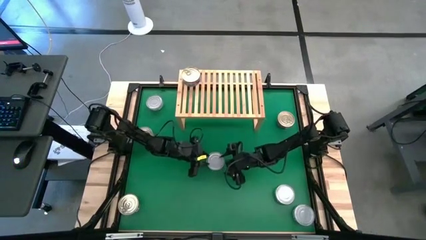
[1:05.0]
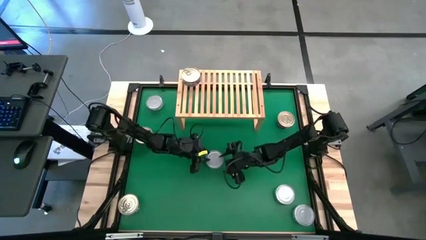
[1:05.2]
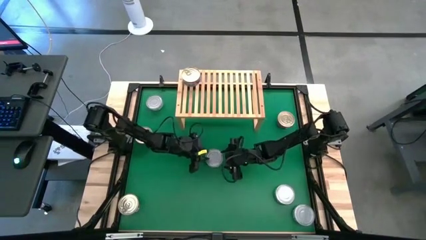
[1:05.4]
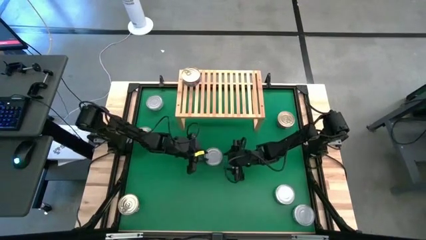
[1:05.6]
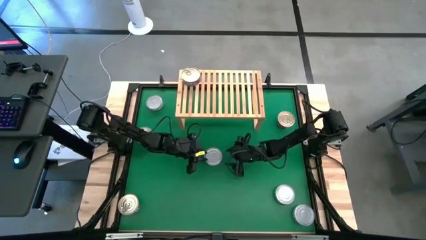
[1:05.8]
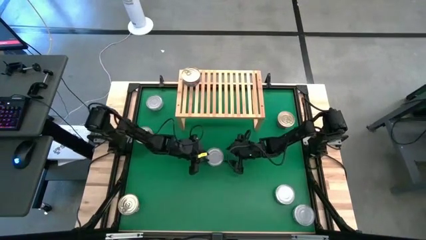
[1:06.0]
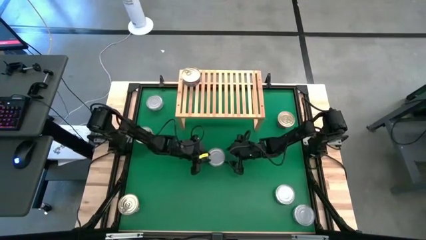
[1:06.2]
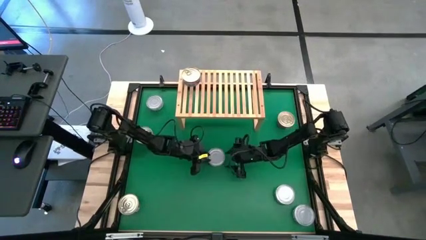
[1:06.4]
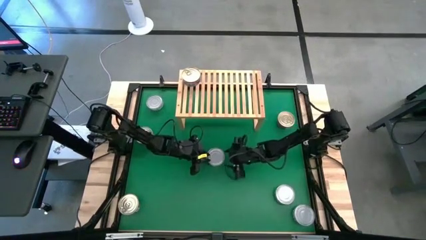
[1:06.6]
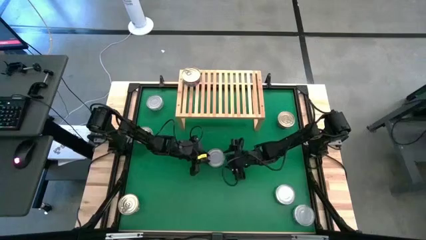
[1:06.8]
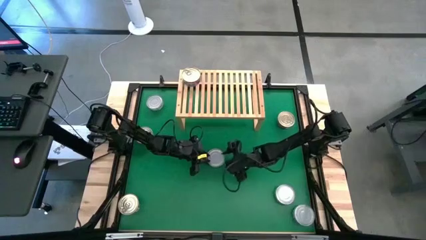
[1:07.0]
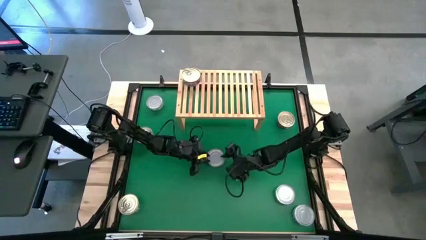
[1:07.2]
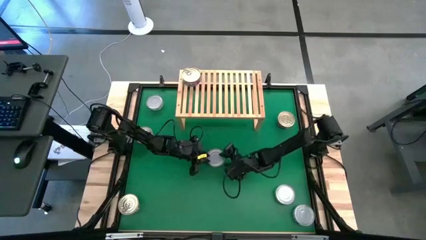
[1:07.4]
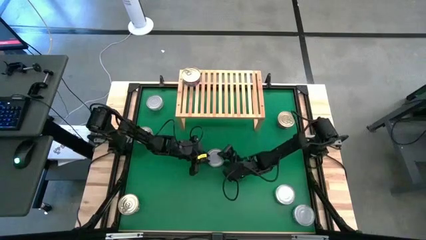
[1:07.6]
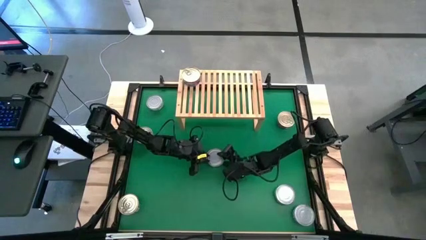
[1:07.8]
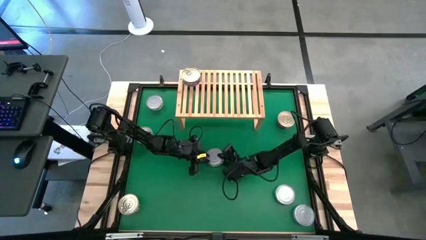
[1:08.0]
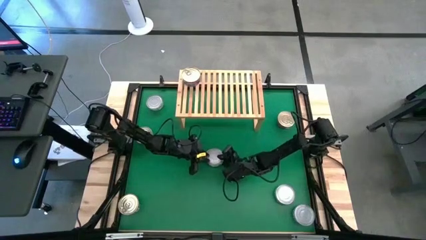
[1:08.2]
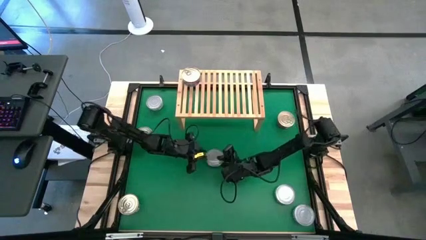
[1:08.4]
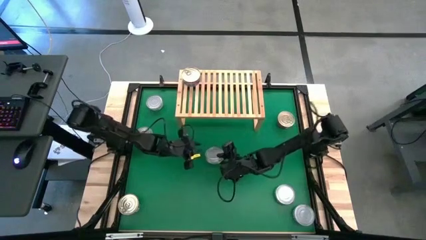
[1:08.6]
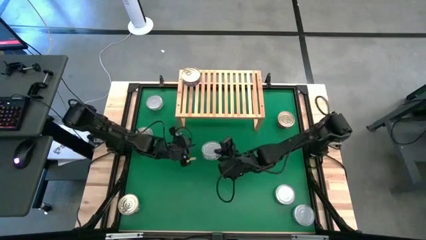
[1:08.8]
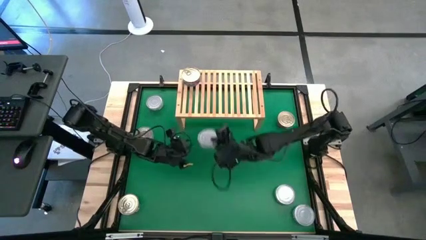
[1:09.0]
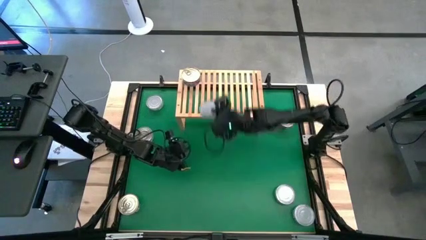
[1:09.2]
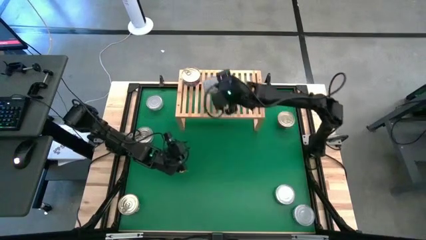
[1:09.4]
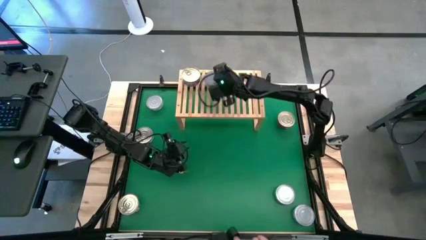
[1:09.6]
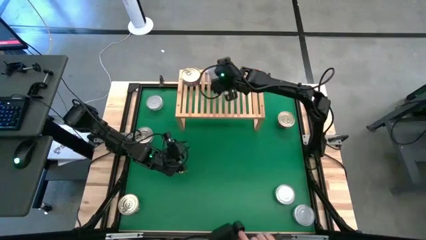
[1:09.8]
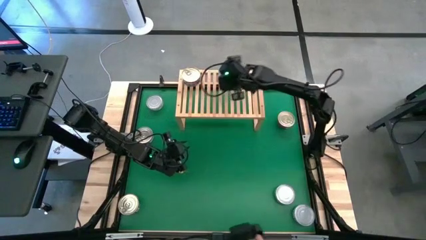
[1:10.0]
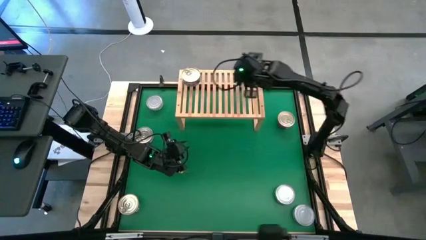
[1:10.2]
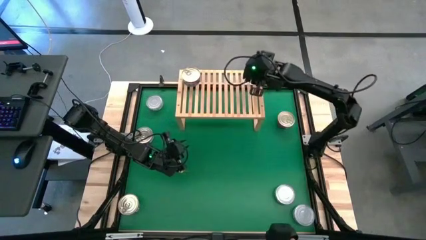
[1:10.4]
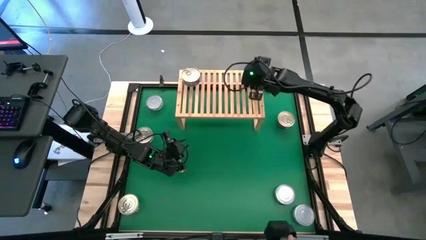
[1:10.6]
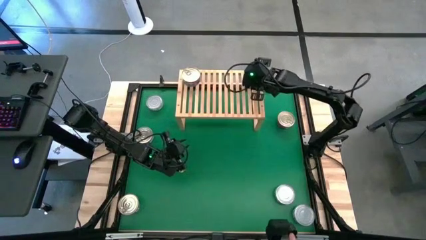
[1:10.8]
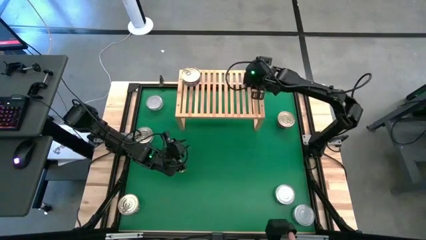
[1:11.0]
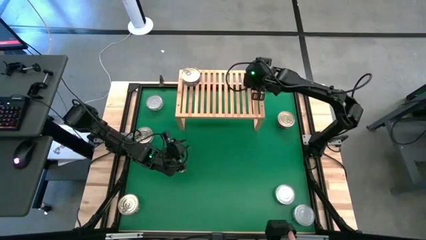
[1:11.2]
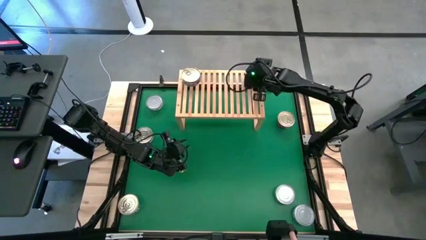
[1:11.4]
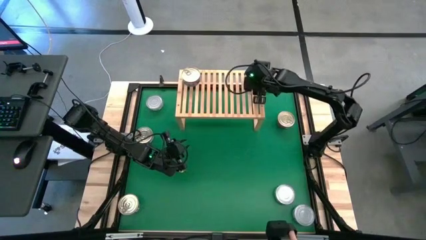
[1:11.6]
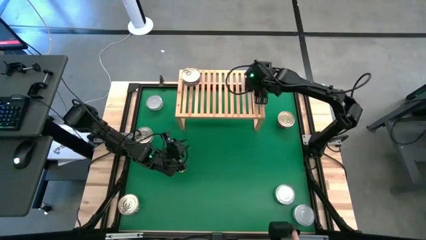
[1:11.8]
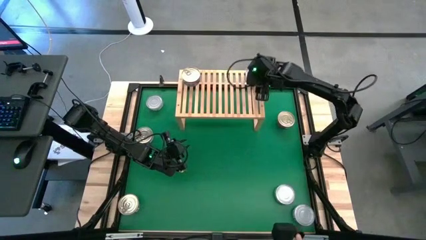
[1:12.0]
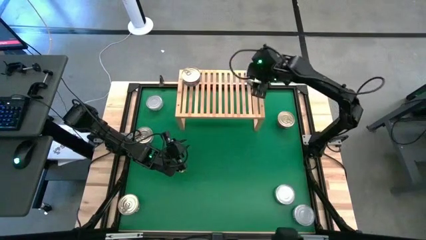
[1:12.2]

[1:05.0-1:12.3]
Task: Stack canned seafood by type on shelf
Put the center green tuna can on the shelf

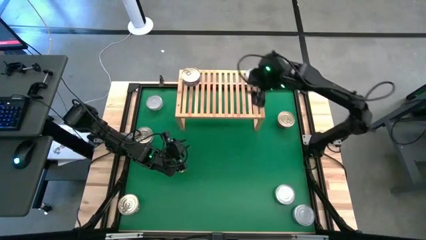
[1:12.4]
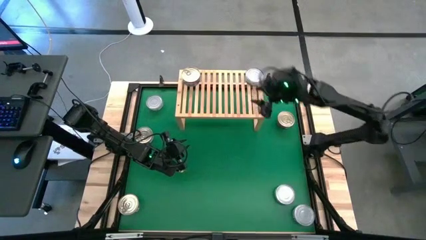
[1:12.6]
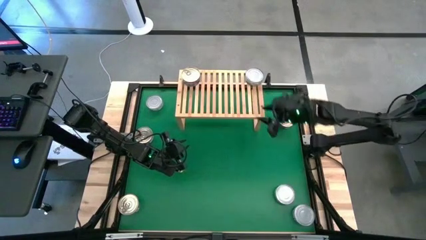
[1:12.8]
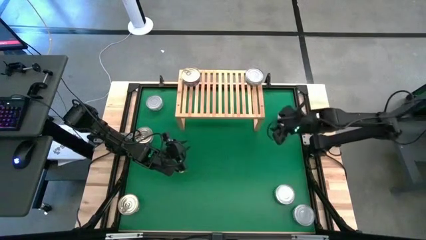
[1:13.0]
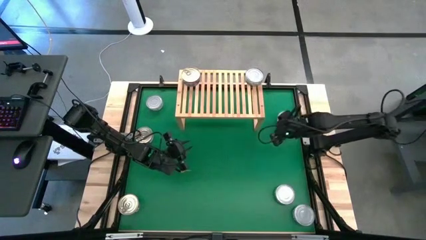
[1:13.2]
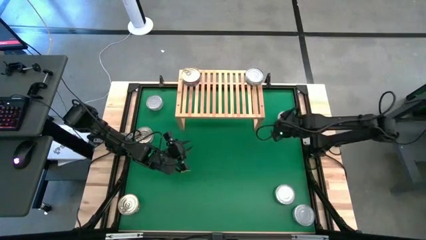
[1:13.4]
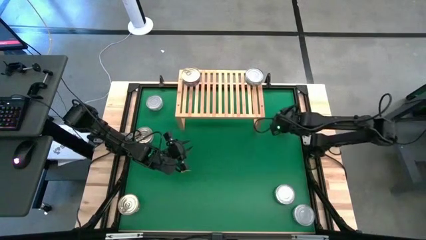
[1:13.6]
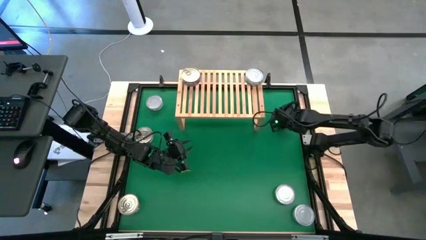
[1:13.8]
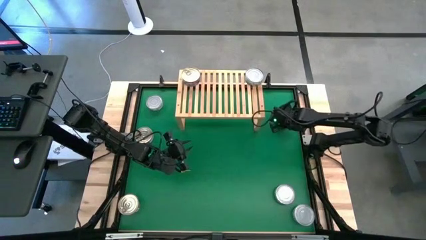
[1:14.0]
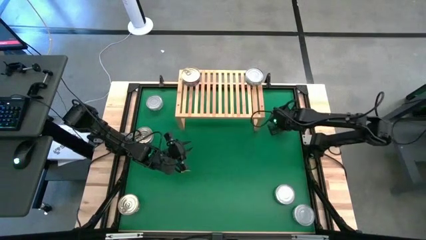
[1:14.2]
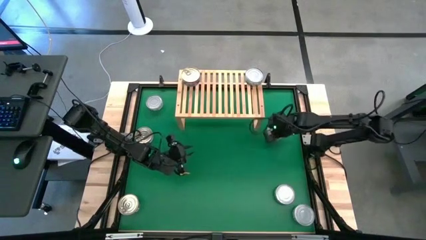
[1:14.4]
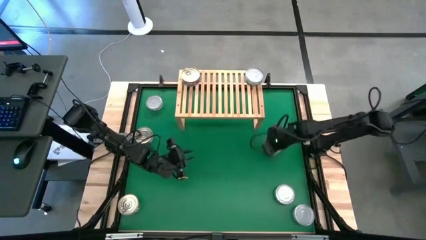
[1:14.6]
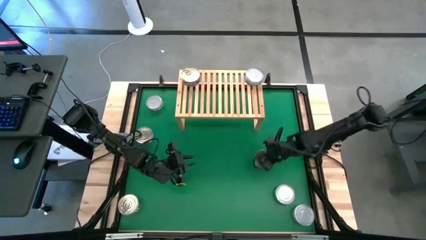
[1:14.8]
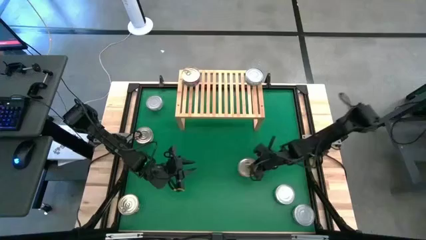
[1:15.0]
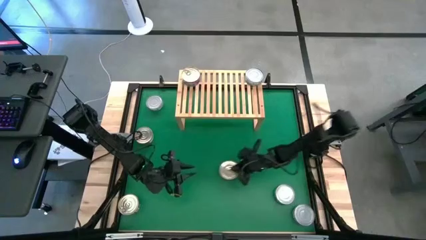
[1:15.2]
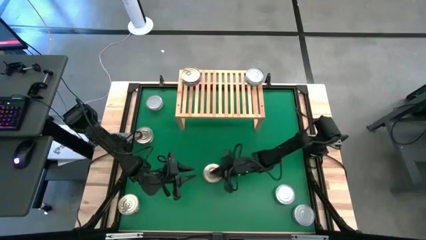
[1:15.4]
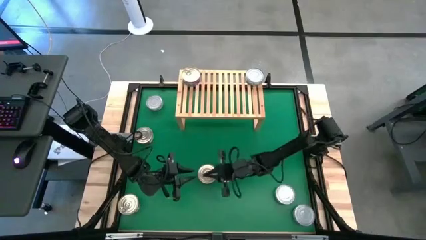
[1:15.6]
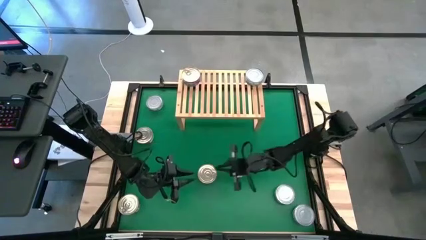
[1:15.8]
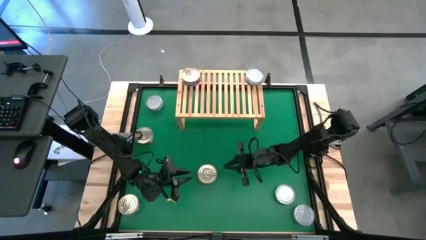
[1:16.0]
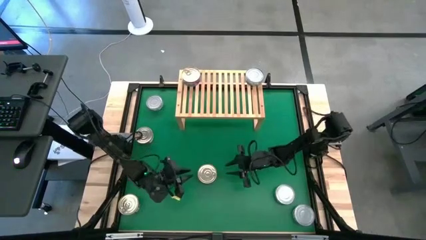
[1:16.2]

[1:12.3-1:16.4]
Move the top right blue tuna can to the center of the table

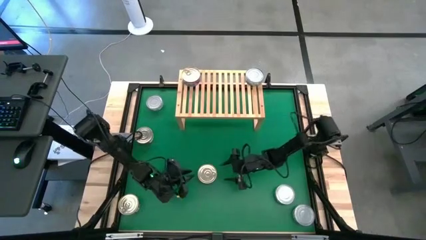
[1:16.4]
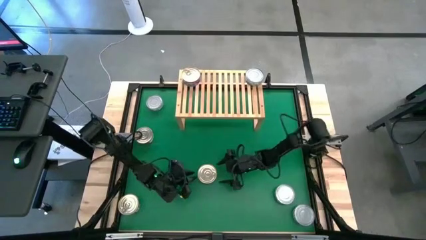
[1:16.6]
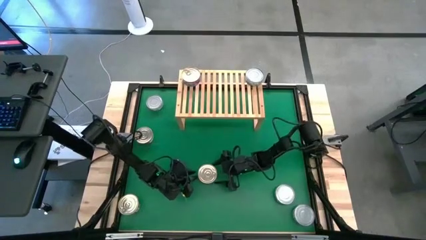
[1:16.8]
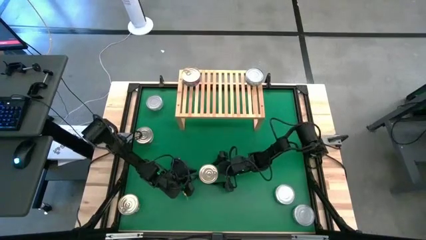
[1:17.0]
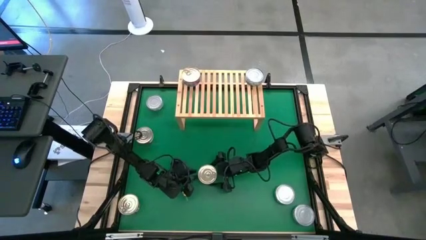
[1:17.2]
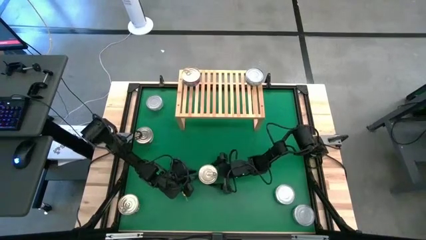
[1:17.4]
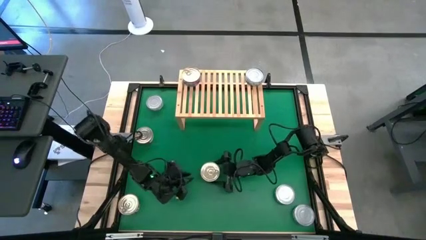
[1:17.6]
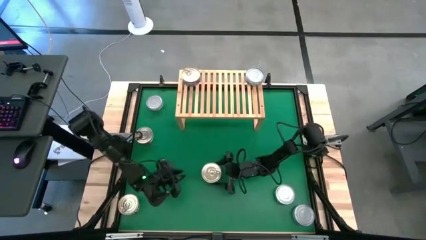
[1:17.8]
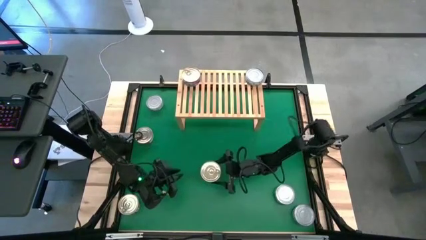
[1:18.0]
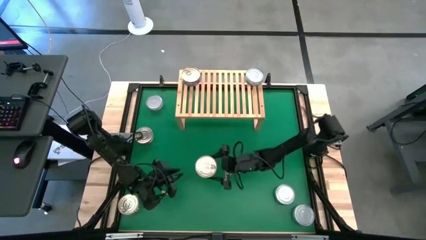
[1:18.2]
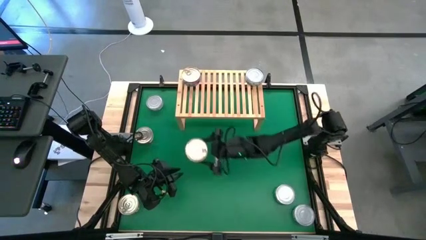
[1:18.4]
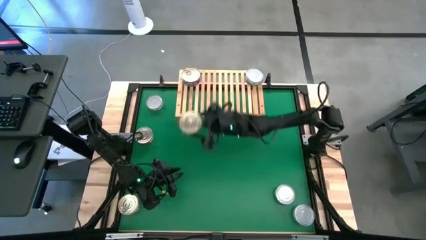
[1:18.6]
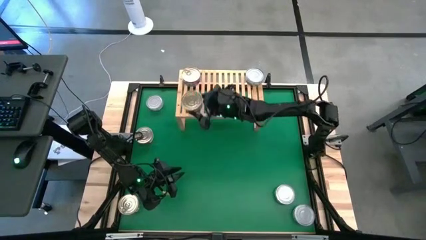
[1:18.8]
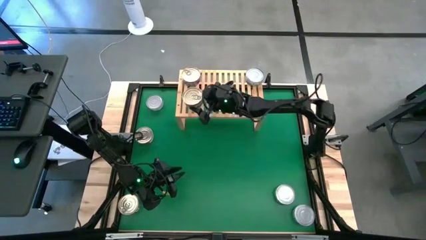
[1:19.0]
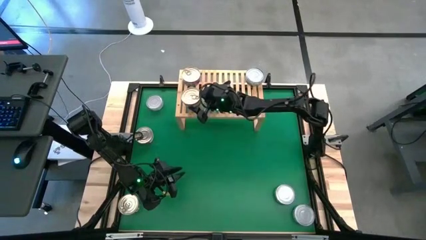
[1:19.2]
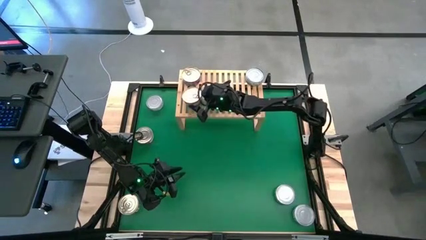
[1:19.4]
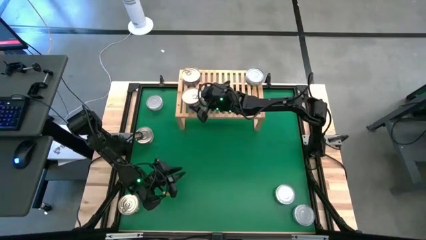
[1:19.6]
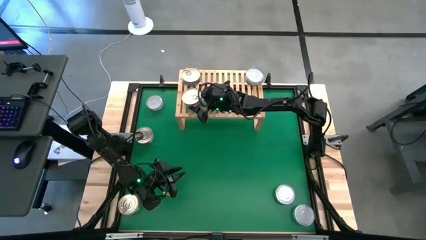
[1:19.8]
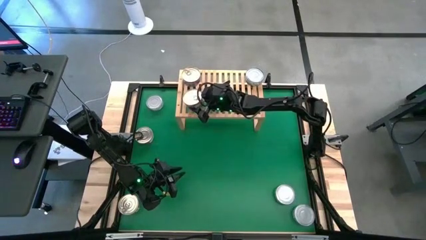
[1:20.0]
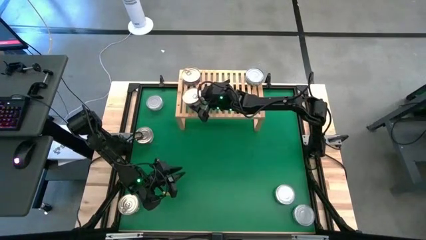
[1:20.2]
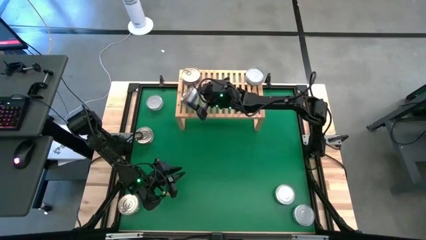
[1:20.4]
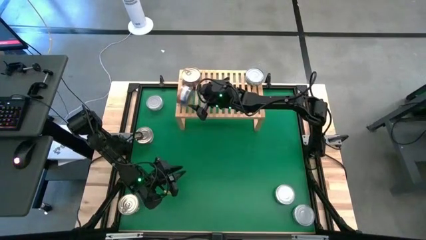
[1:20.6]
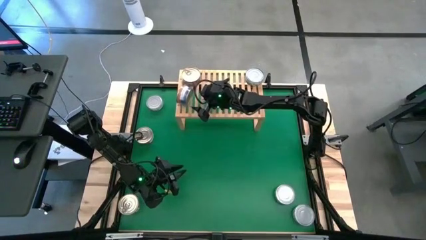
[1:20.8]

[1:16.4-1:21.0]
Put the center blue tuna can on the shelf aligned with the other blue tuna can
